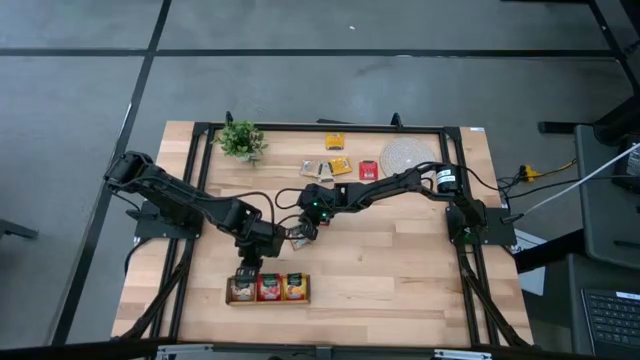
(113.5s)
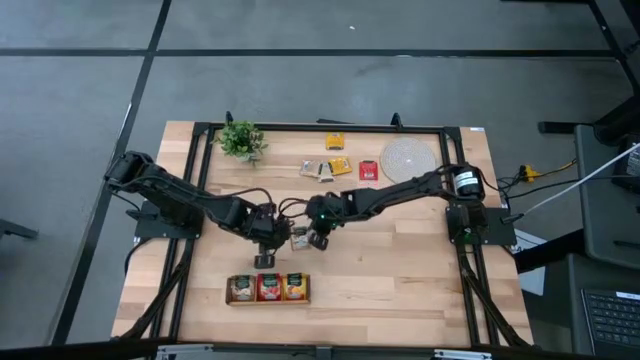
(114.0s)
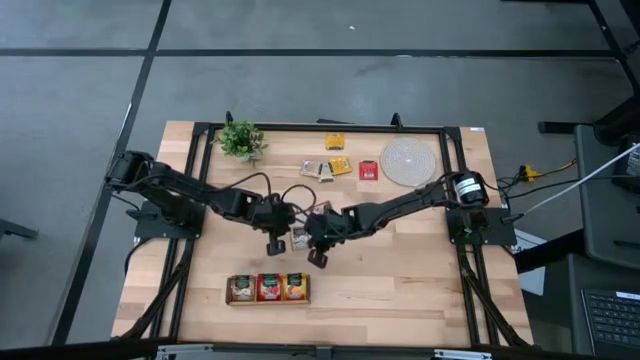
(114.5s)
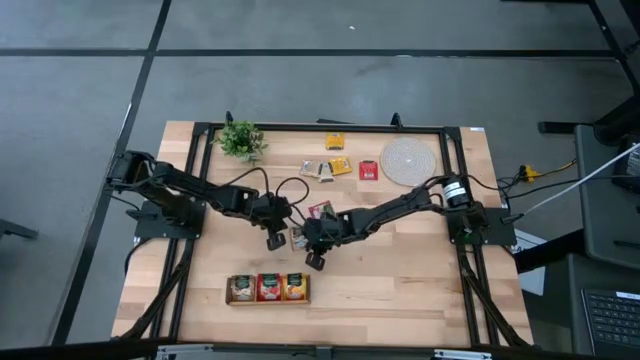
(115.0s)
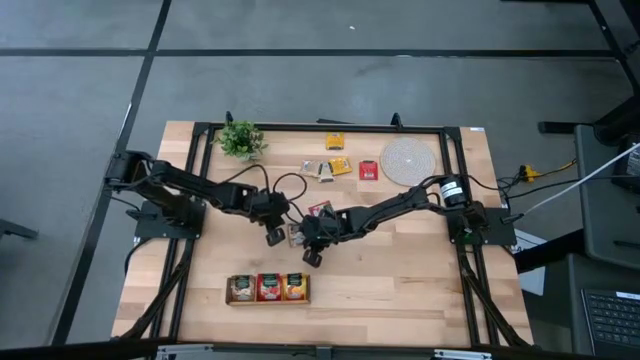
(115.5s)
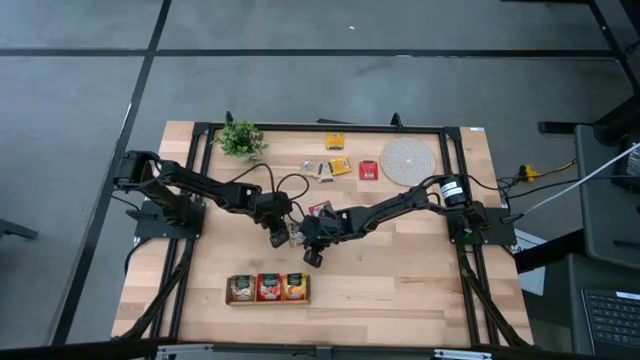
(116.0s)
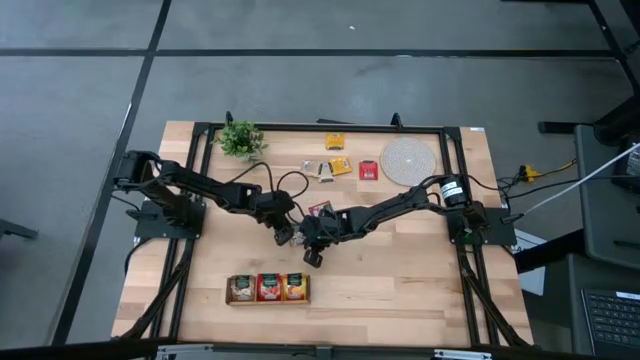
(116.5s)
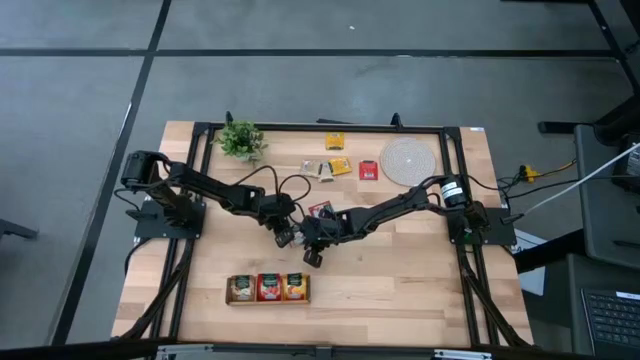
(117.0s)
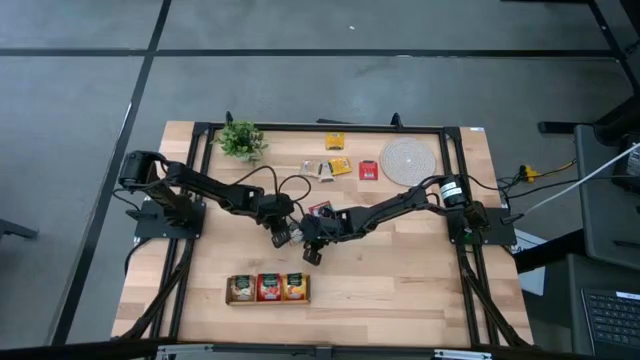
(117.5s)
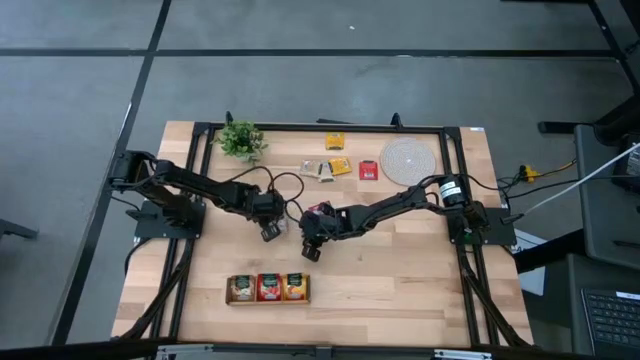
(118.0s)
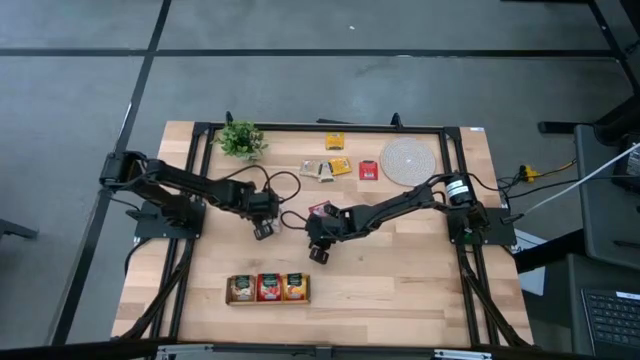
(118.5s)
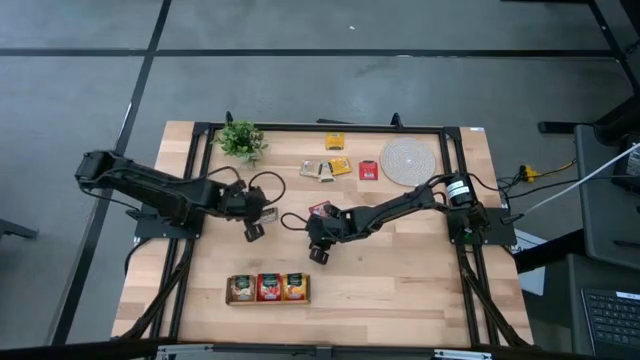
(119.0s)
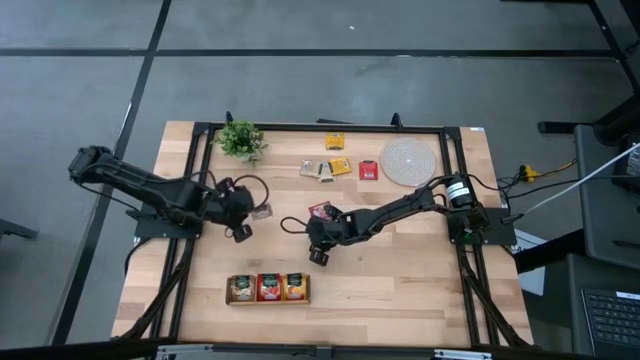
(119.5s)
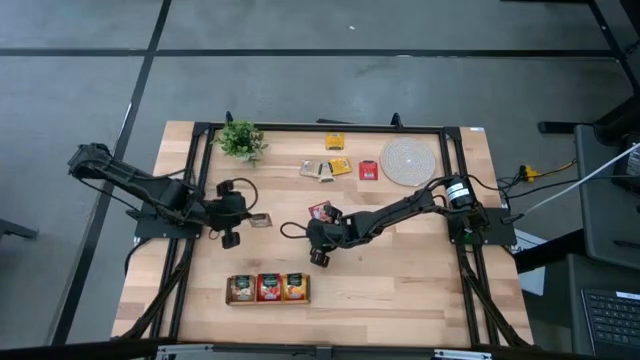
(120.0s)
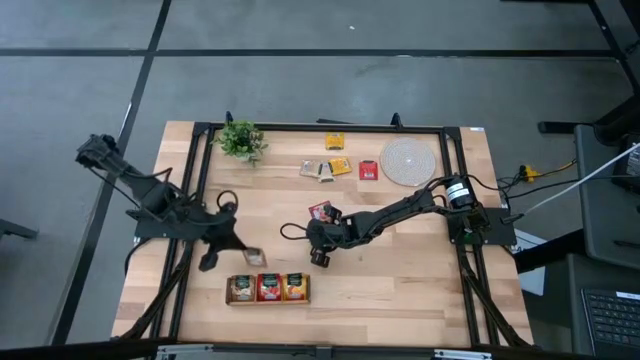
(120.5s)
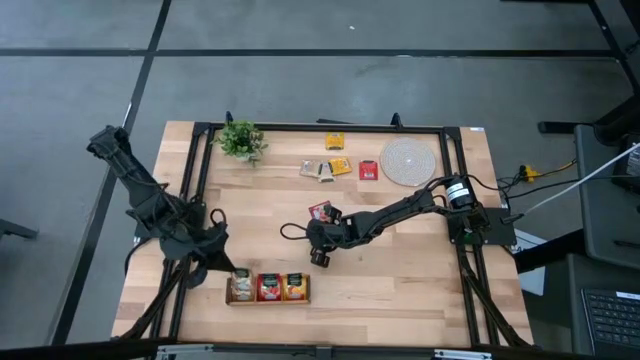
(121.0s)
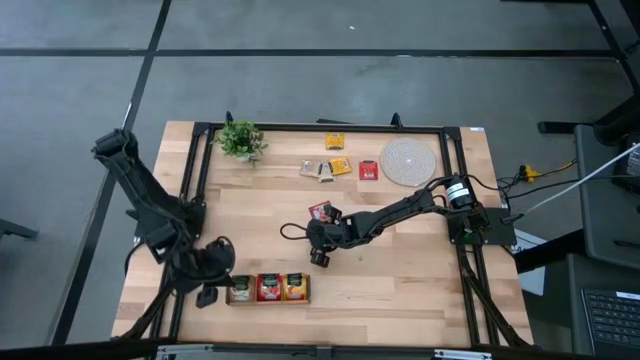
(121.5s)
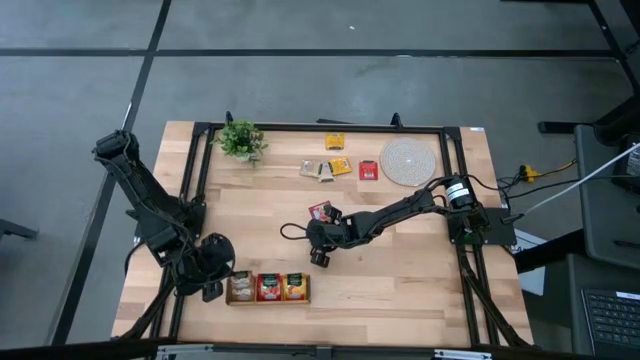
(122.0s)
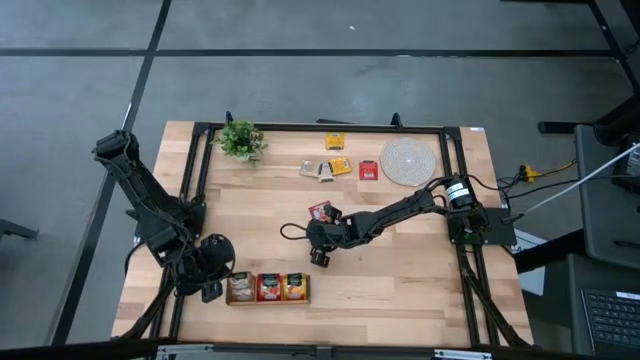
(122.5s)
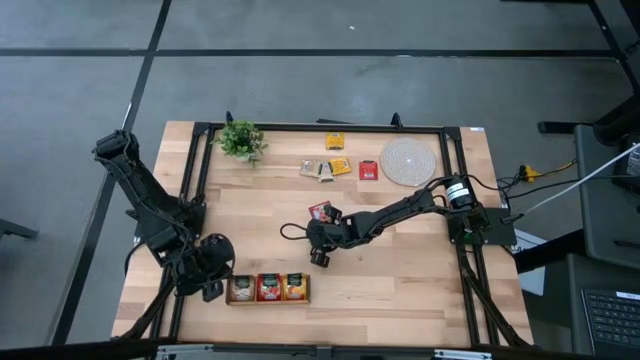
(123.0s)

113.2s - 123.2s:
Task: Pick & Place Tea
Put the brown tea bag into the left section of the wooden organizer

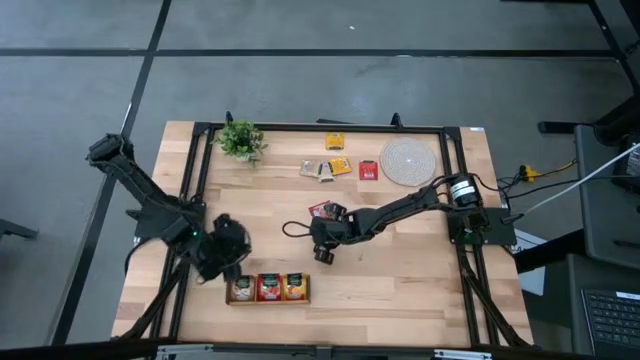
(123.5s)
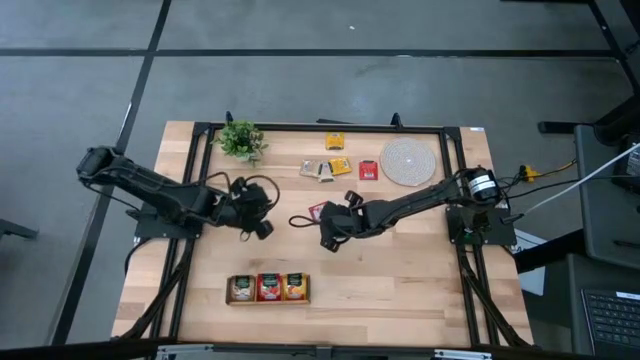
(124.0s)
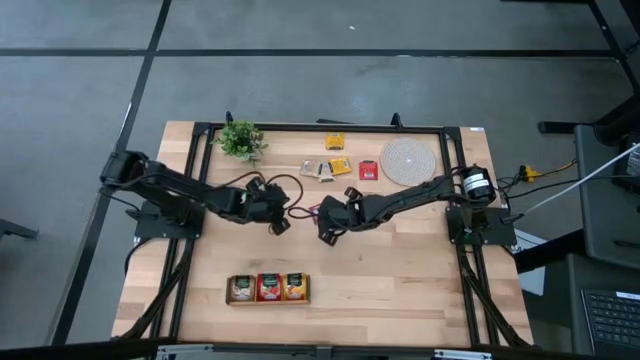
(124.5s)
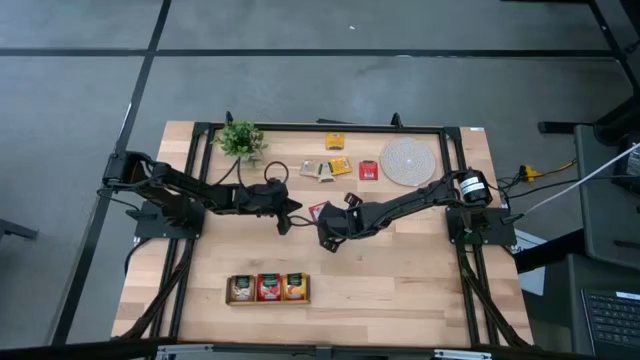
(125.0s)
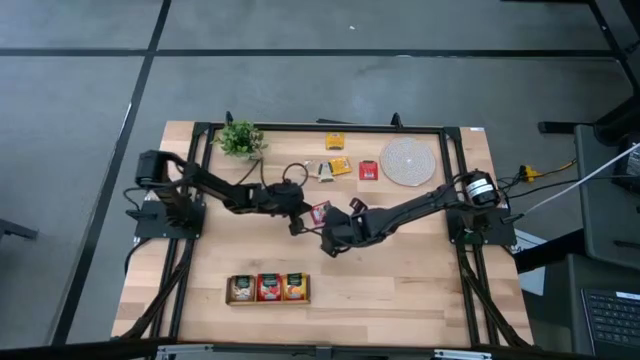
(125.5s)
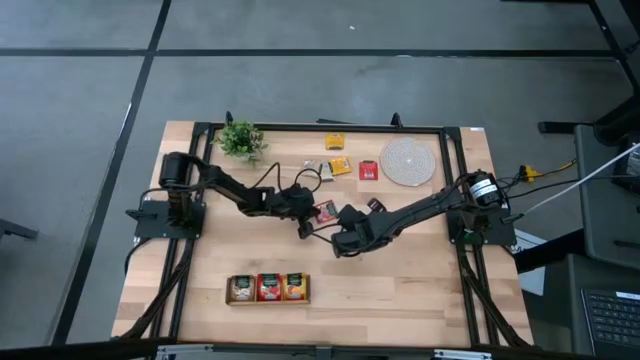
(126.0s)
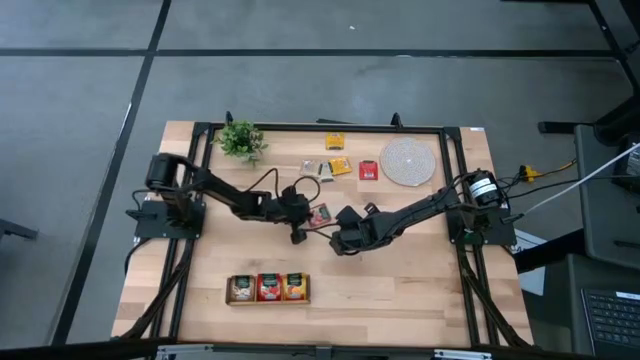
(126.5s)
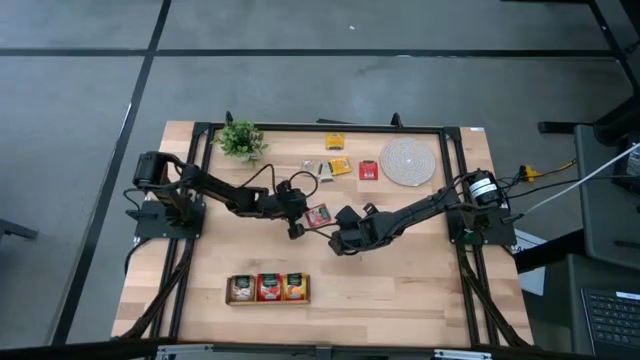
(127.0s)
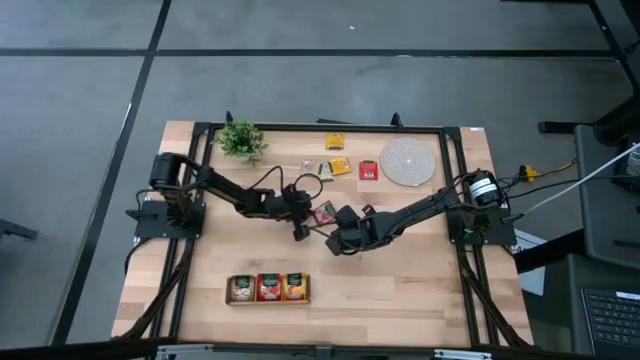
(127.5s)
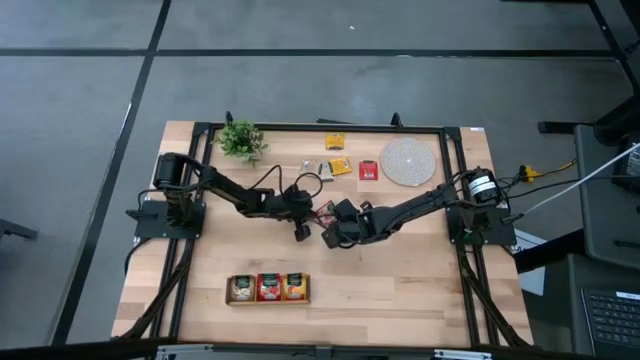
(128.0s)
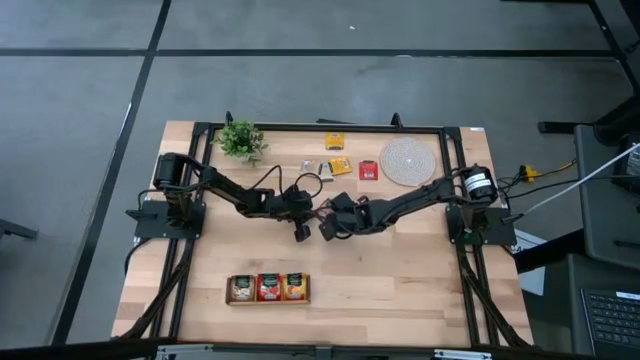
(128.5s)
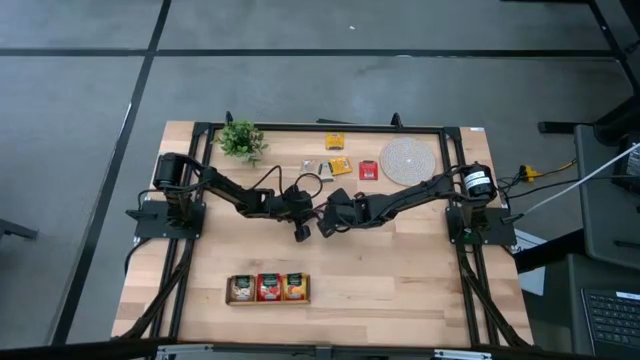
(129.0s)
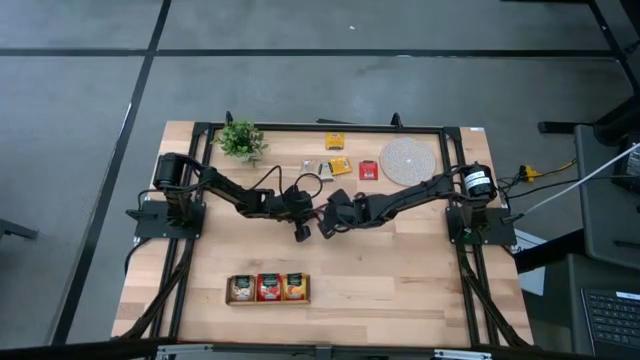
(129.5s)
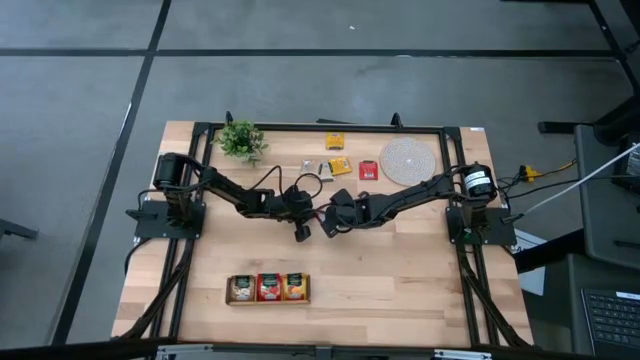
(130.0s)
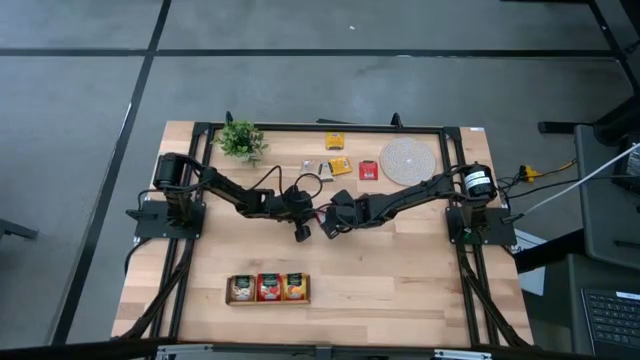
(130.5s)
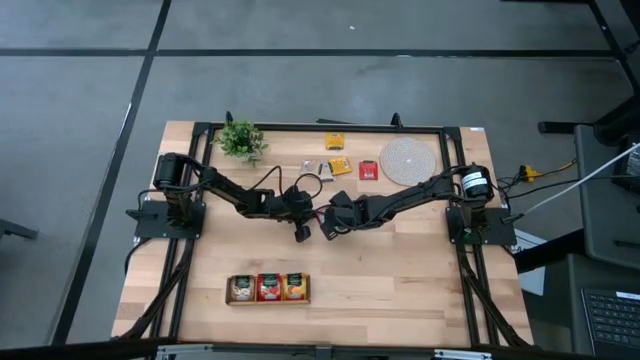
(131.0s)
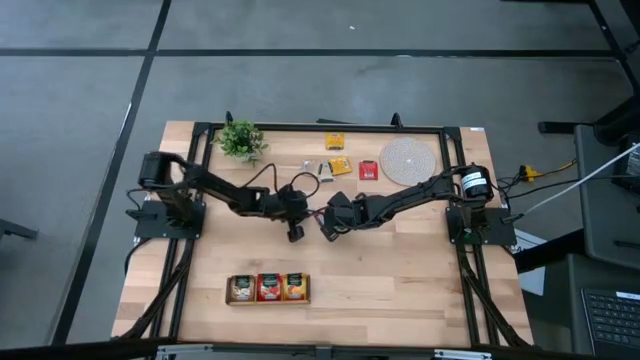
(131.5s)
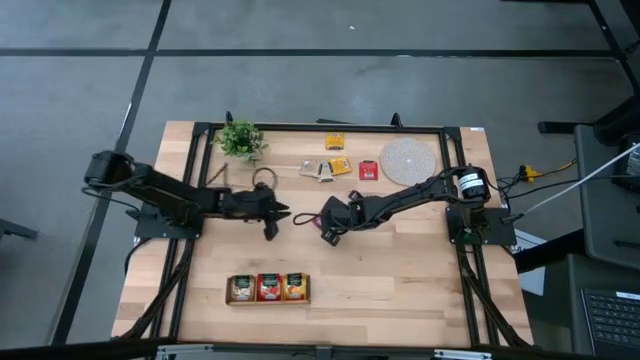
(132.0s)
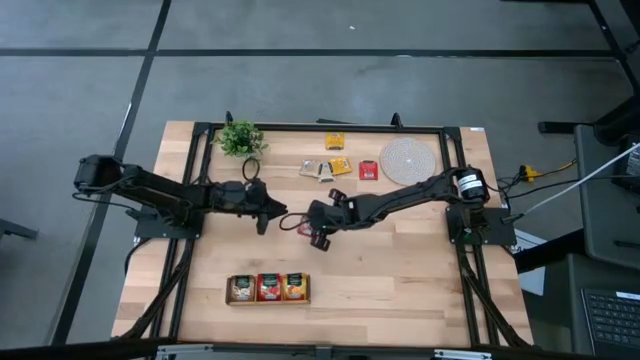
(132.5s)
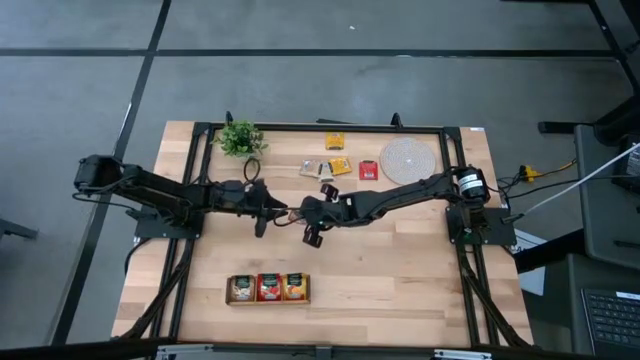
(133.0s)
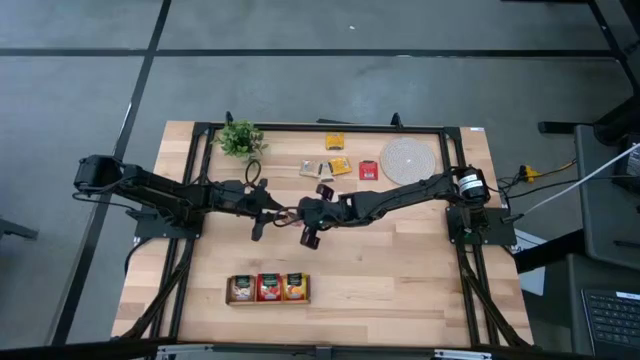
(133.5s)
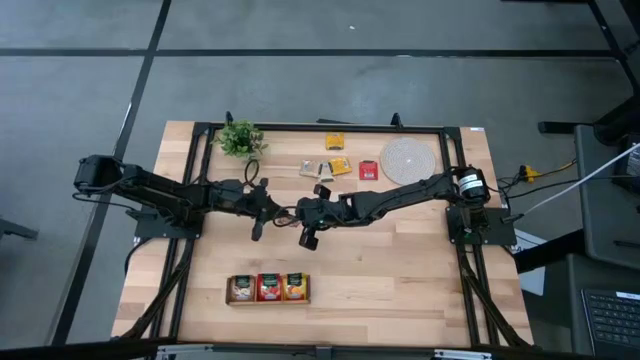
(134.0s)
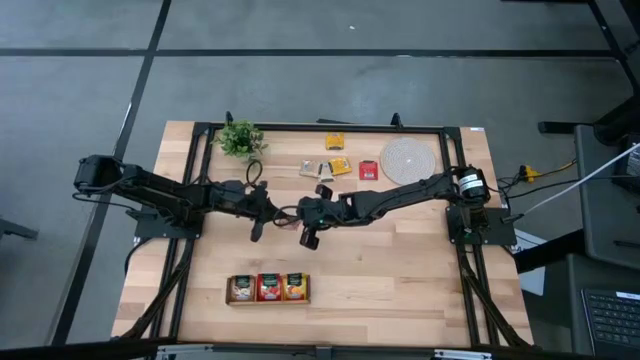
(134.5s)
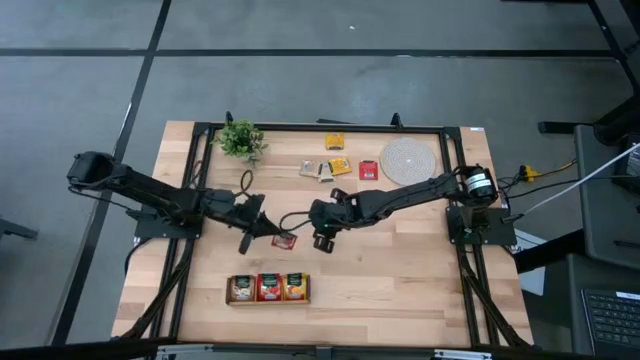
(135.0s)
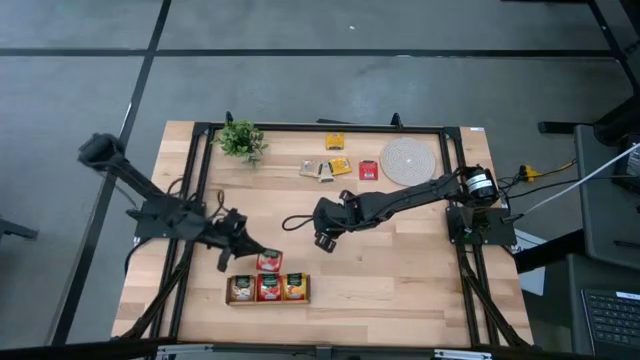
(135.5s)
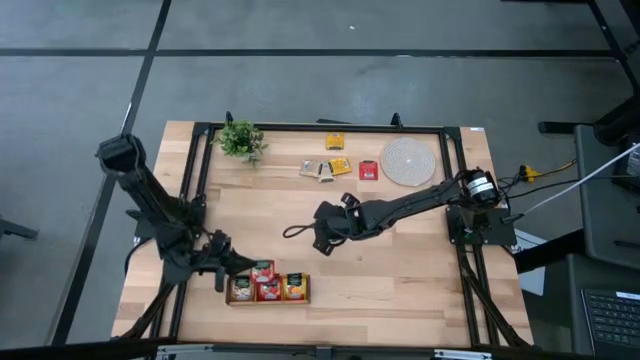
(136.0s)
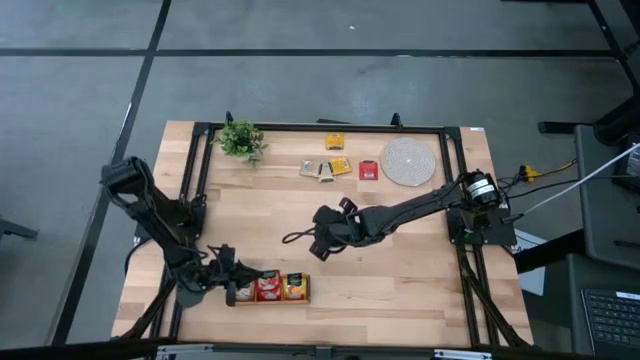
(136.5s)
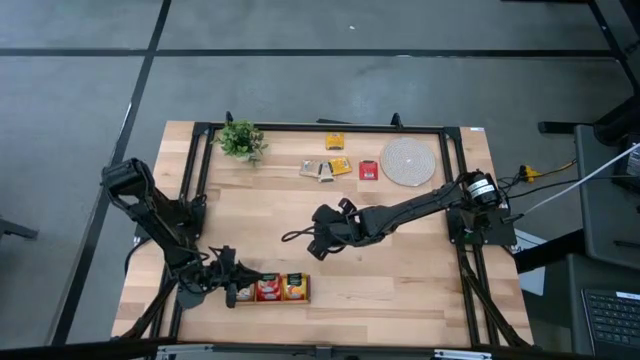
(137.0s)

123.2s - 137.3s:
Put the red tea bag into the middle section of the wooden organizer
